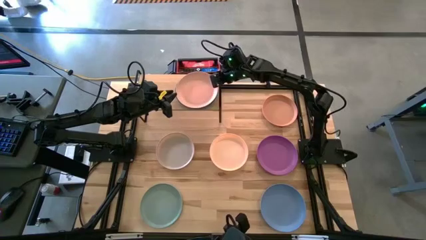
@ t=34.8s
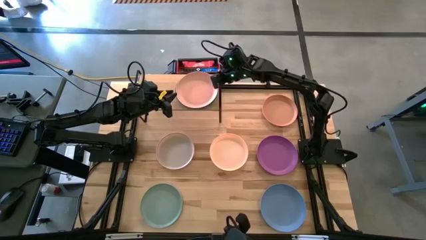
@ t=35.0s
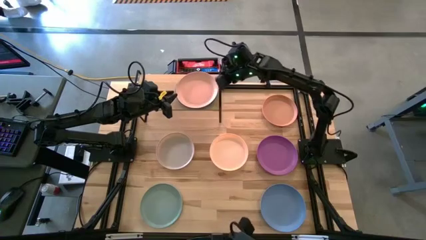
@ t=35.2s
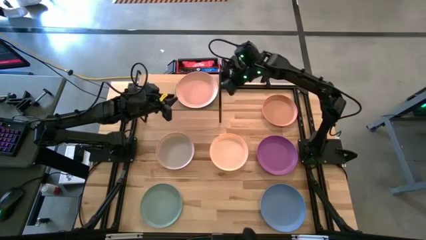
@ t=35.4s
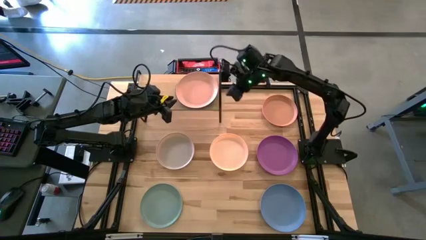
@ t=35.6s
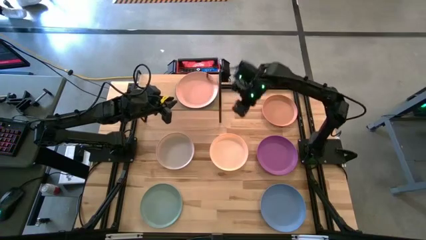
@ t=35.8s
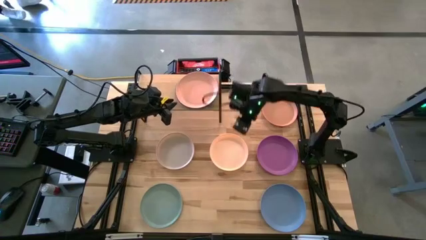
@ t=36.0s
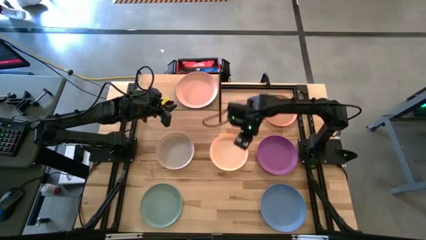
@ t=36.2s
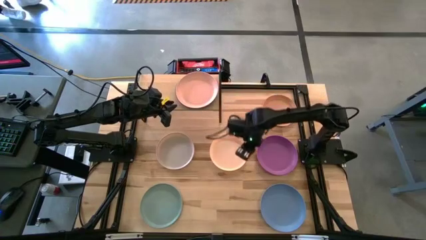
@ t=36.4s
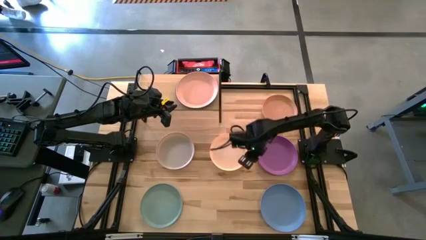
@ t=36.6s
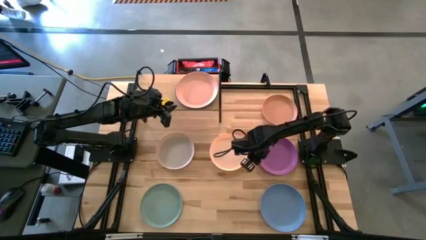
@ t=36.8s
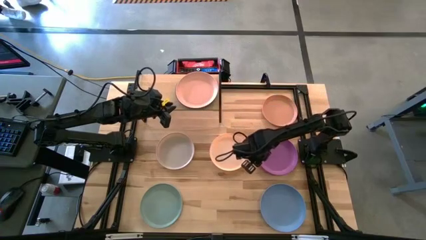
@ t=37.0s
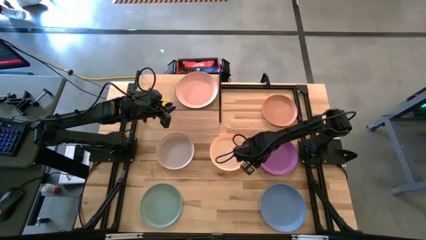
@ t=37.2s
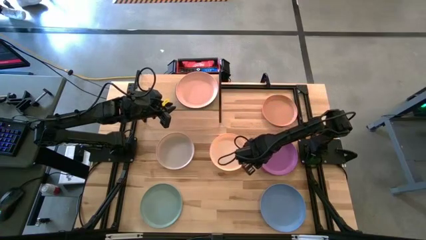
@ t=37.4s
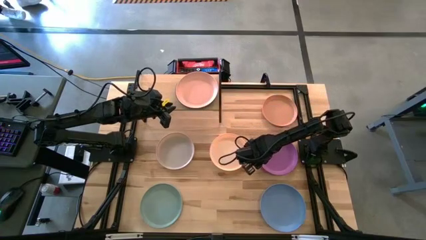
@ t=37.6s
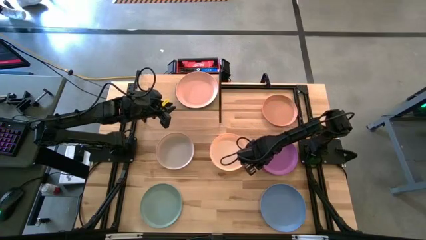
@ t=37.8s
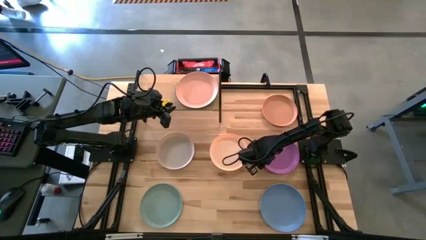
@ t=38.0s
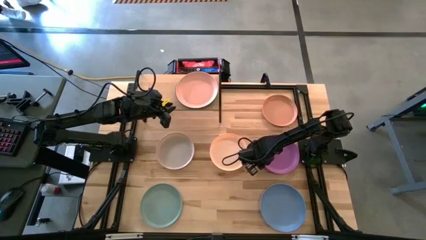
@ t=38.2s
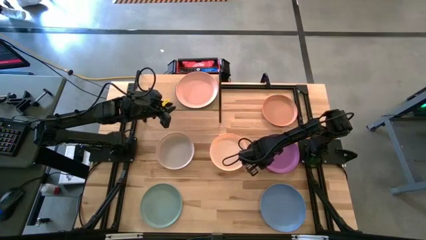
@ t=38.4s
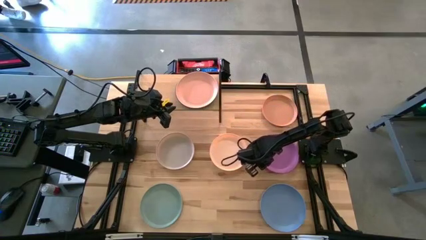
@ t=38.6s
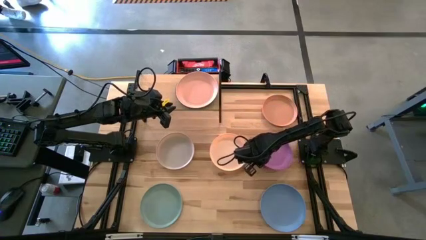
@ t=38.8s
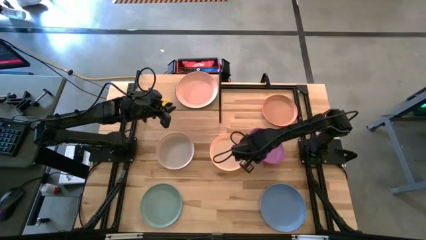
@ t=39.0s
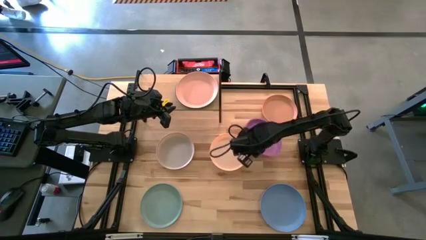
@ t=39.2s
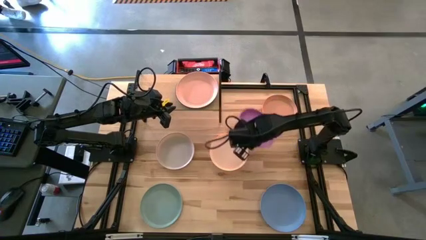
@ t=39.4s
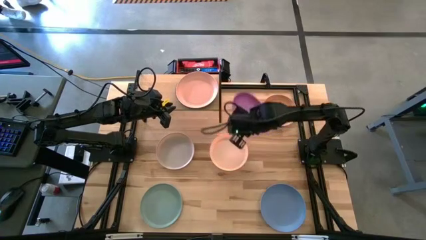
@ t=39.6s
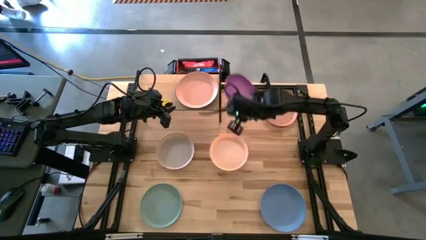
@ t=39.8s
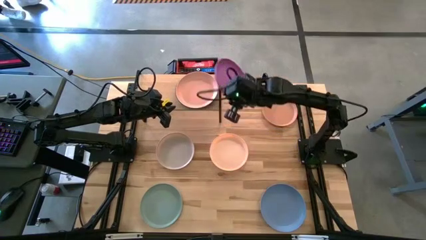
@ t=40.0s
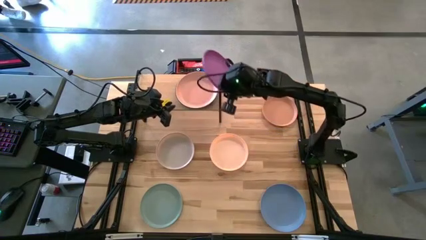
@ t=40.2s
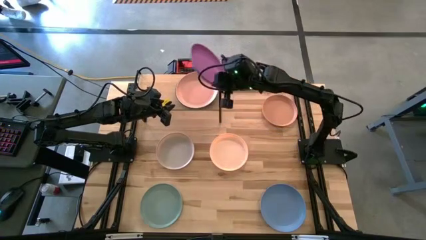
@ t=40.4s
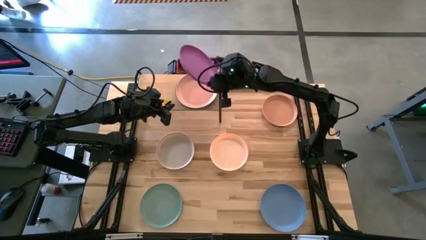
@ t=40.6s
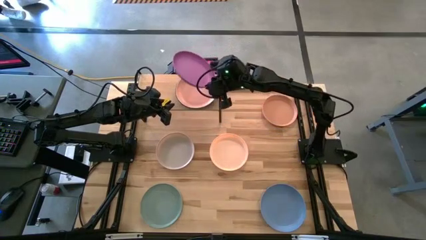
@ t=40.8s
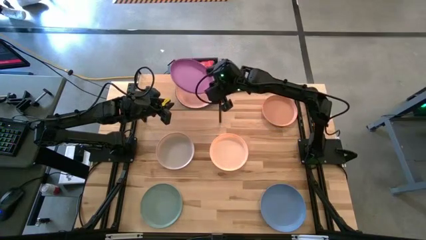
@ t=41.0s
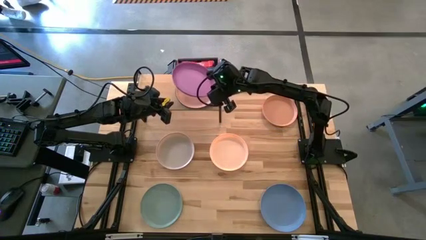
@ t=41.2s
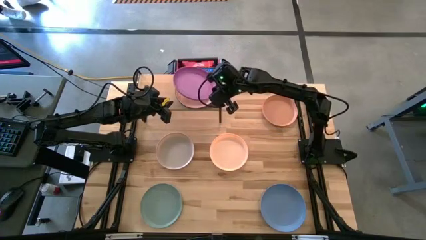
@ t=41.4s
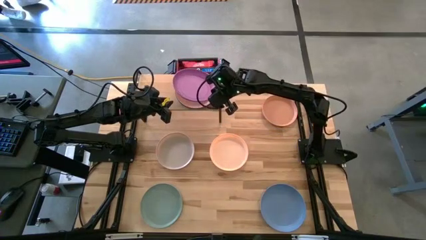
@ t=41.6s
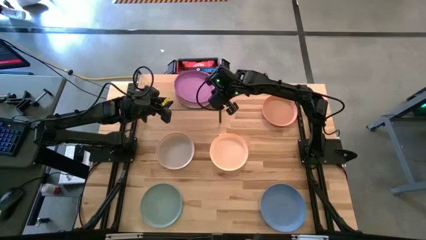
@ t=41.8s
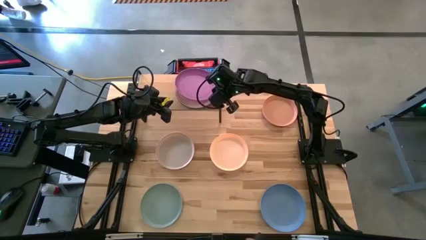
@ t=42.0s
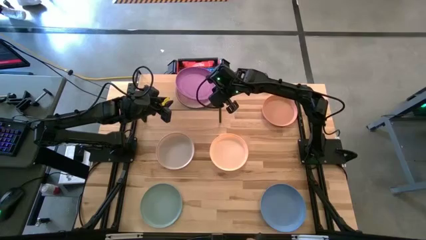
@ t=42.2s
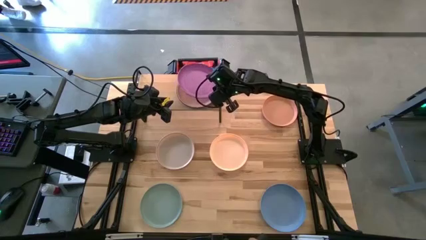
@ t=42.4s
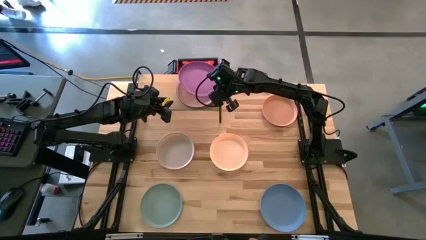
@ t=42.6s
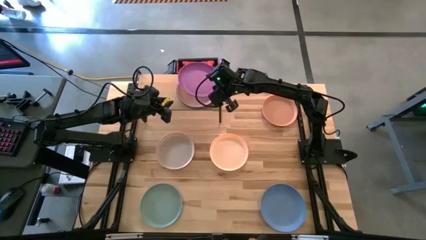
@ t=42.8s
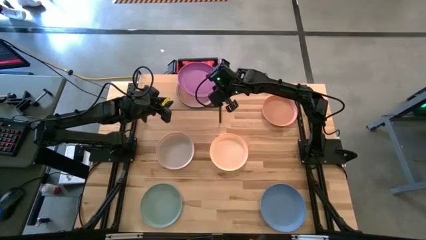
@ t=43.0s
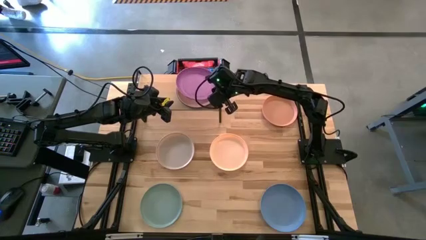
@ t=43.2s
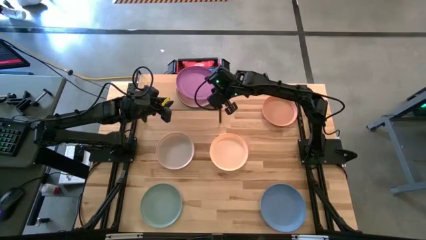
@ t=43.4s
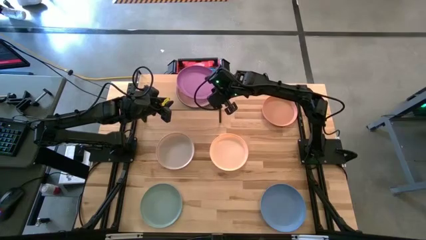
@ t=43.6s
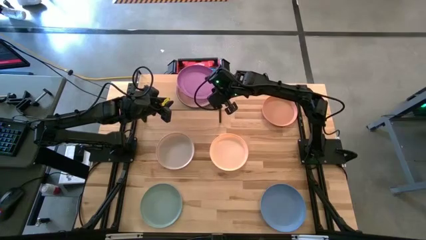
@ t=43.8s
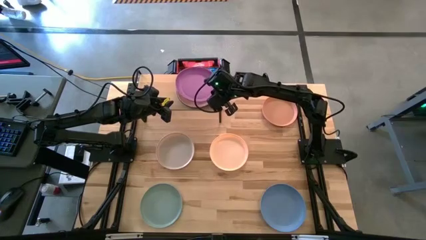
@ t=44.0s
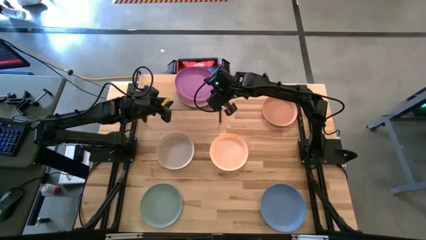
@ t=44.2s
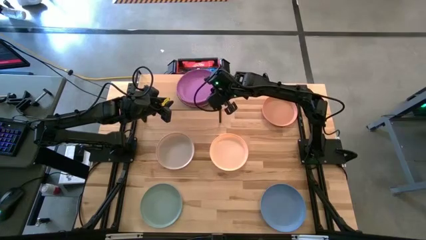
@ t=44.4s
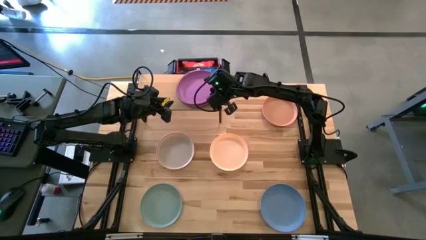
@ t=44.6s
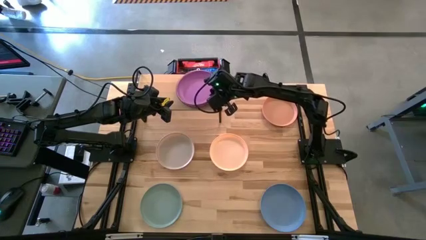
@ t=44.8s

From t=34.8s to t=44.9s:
Task: Place and stack plates onto a shelf
Stack the purple plate on top of the light brown plate on the shelf

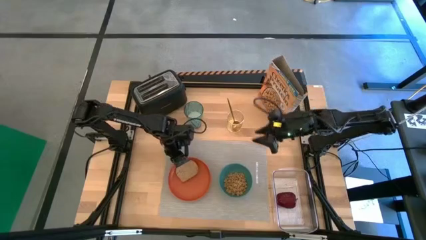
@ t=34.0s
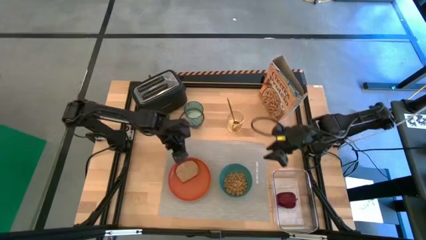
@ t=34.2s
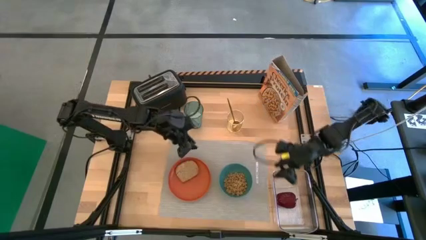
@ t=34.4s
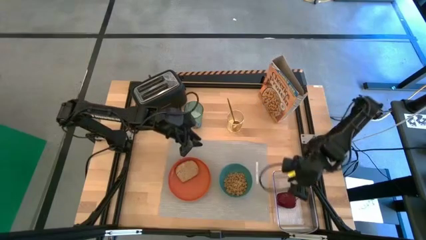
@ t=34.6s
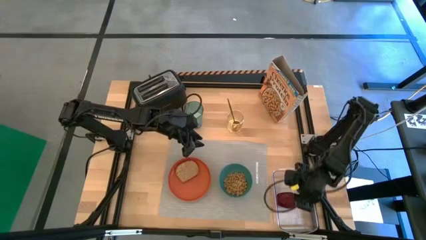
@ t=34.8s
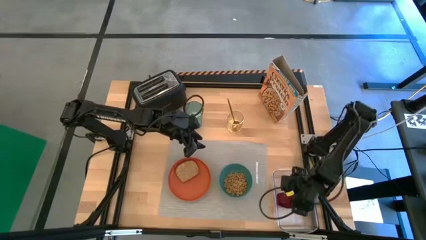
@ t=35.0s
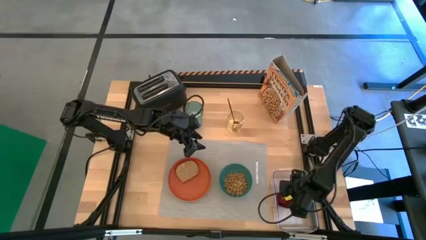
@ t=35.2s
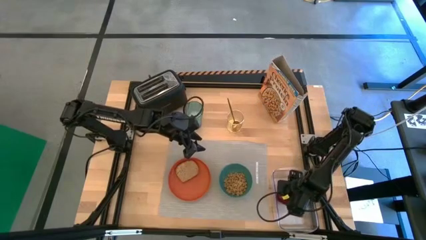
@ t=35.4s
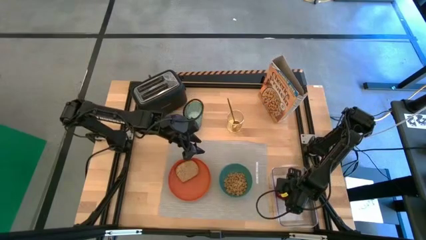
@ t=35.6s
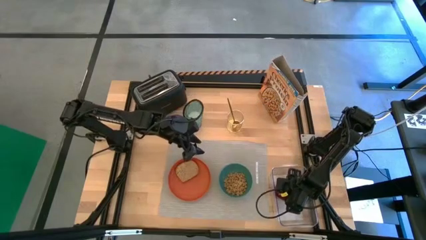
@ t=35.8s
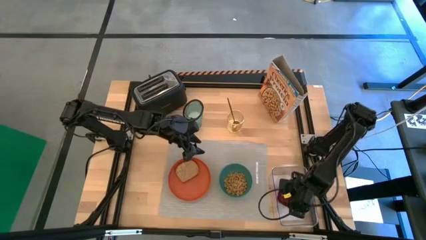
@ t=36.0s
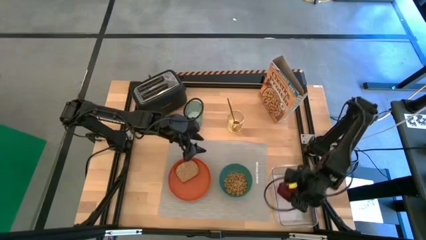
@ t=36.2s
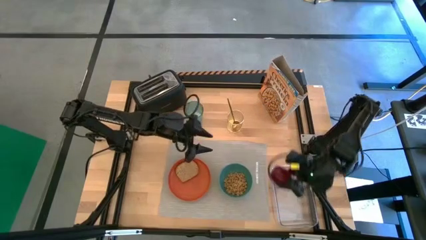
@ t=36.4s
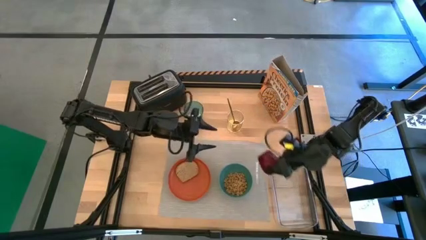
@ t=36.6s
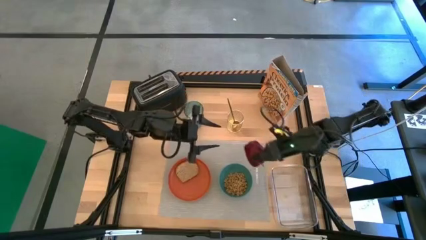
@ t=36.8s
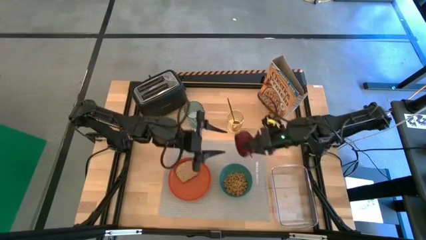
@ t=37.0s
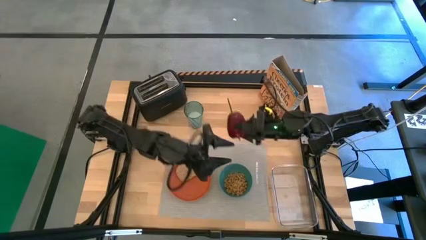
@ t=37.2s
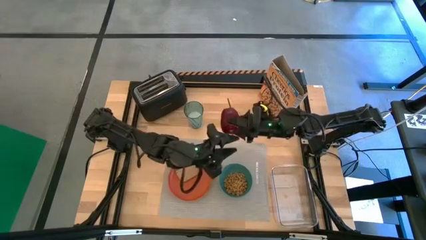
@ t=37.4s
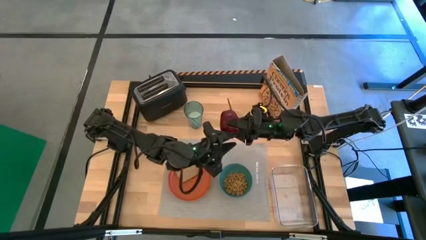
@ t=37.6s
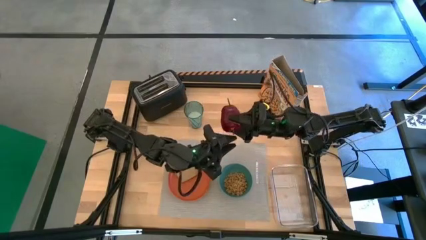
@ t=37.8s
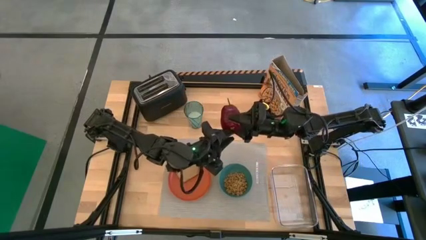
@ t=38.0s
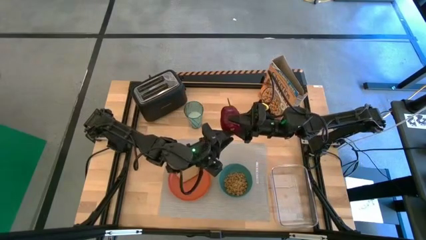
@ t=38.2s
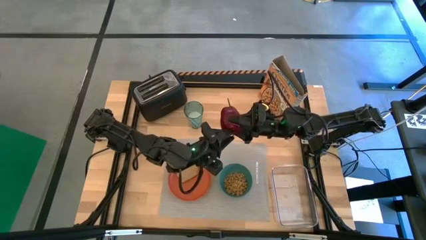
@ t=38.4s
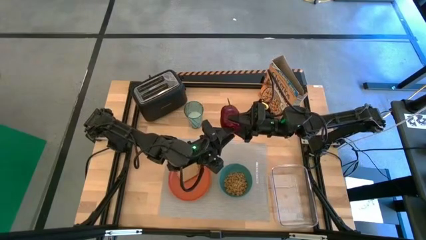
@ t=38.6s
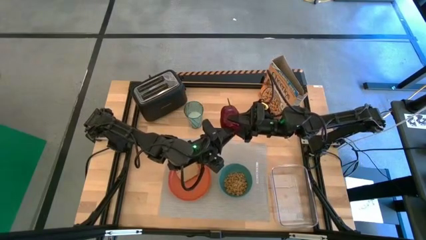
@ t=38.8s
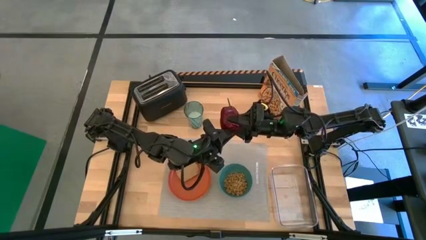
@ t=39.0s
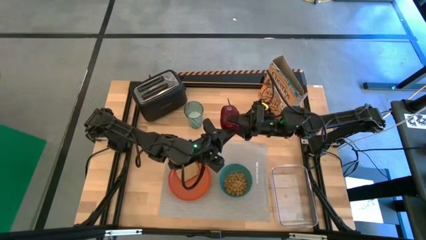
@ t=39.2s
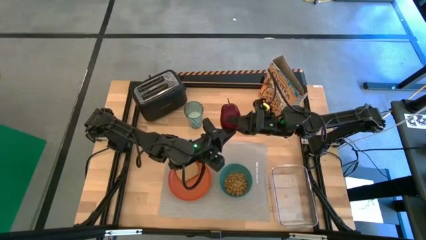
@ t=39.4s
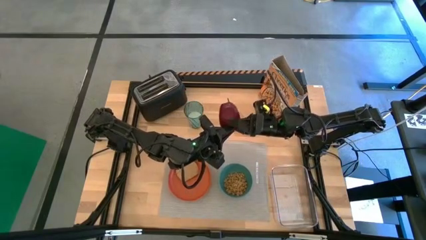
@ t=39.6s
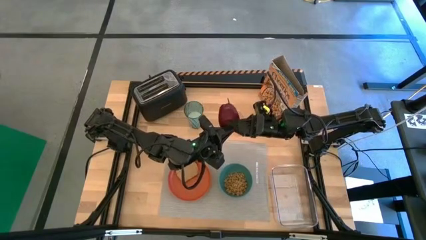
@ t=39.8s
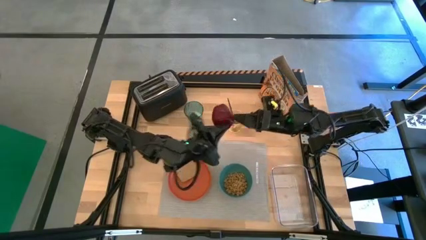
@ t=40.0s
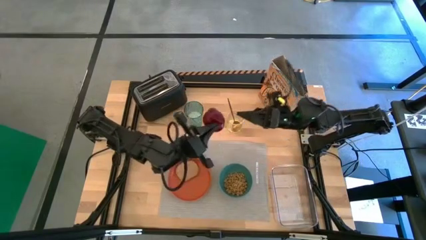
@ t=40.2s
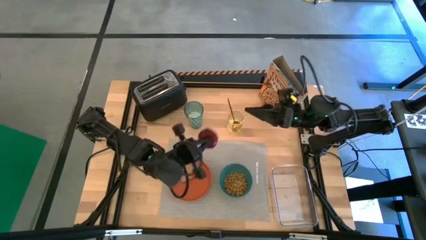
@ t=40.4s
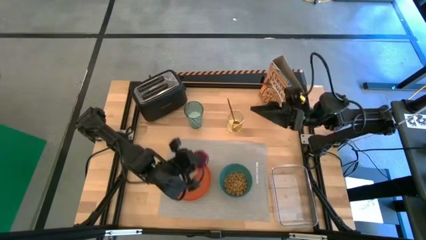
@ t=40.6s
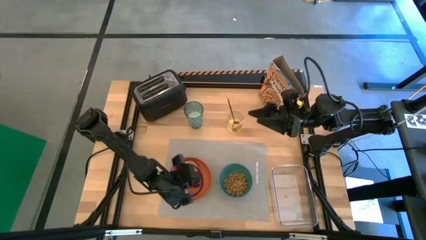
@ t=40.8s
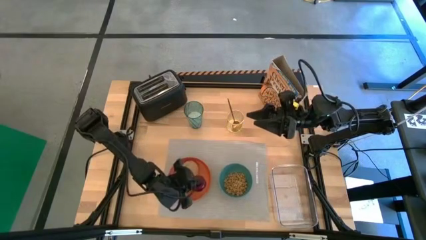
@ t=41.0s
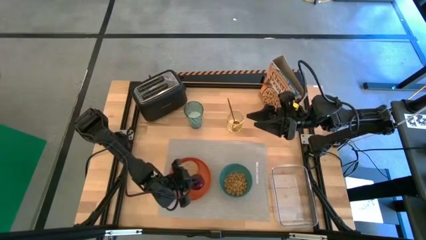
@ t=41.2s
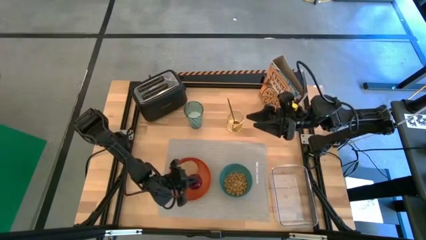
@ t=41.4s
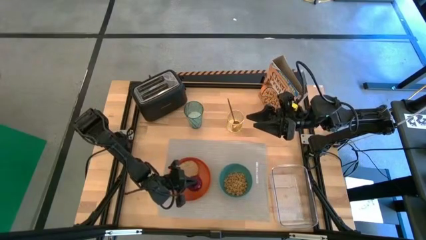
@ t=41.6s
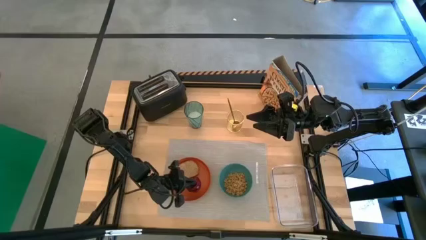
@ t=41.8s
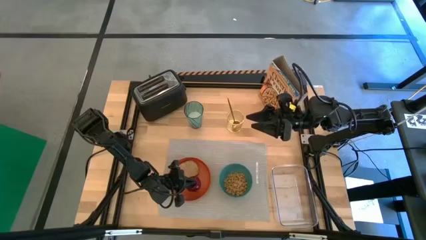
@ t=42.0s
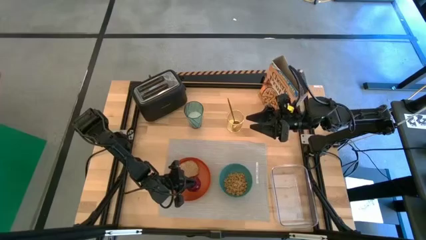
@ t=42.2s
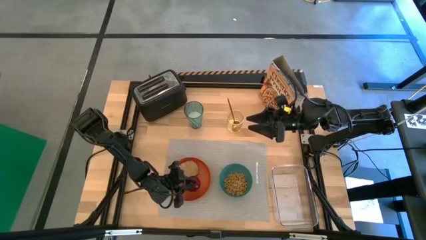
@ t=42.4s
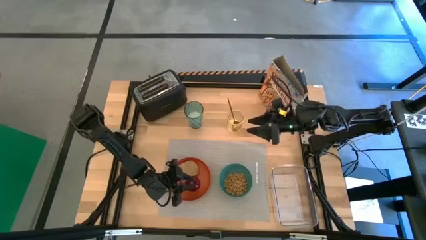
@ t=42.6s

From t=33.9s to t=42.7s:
Task: Arrange a breakfast setting
Put the red apple on the orange plate
